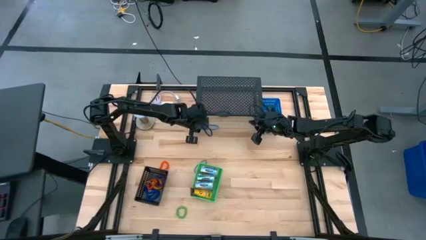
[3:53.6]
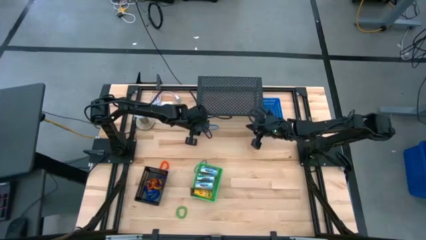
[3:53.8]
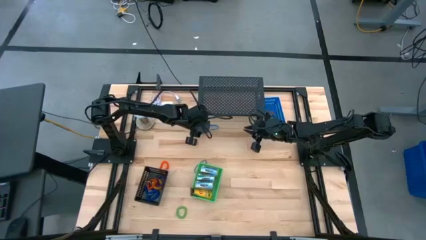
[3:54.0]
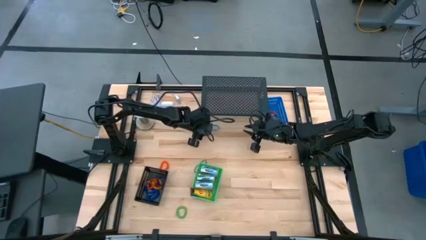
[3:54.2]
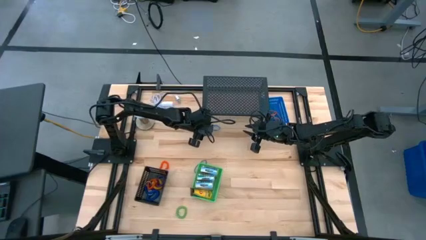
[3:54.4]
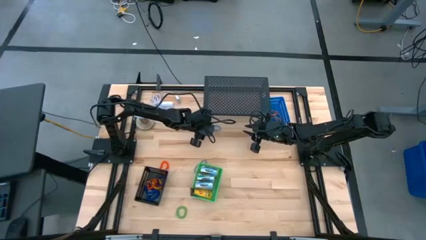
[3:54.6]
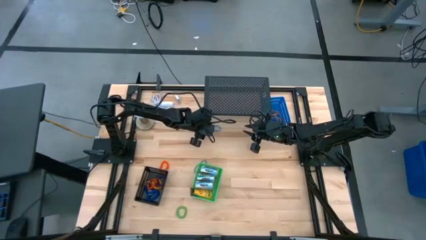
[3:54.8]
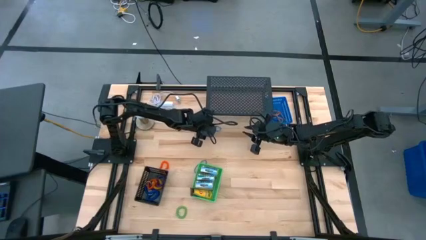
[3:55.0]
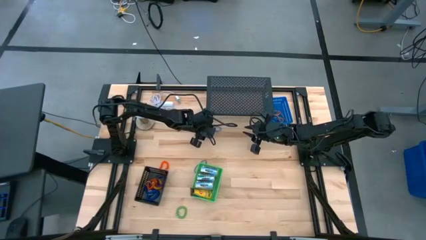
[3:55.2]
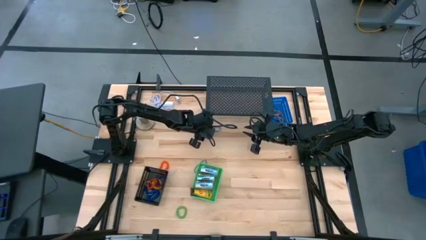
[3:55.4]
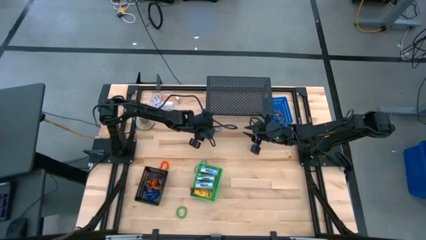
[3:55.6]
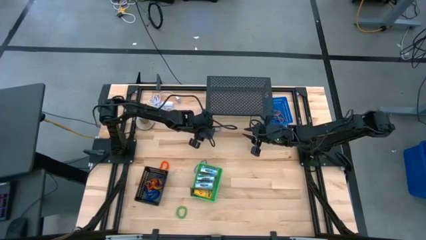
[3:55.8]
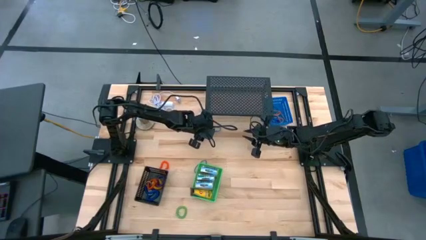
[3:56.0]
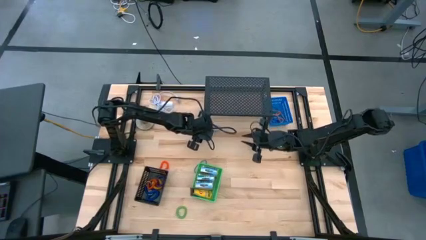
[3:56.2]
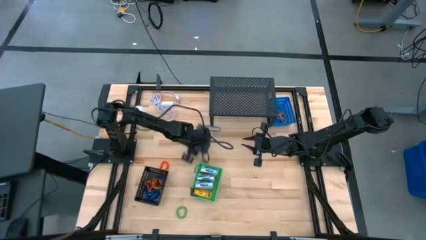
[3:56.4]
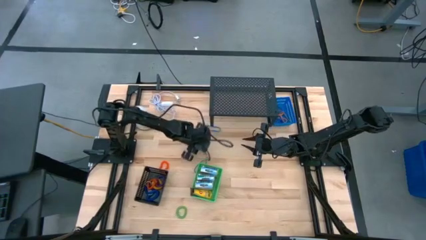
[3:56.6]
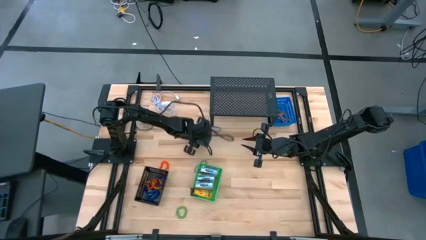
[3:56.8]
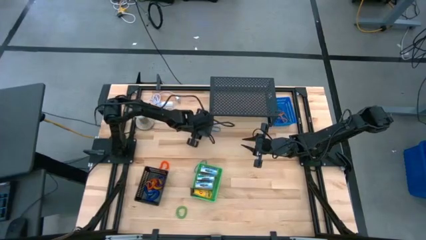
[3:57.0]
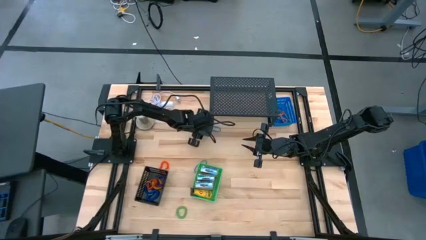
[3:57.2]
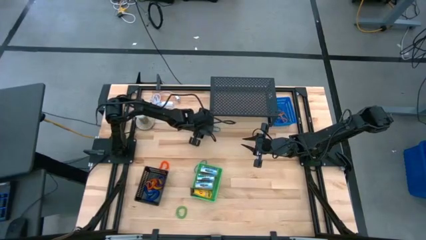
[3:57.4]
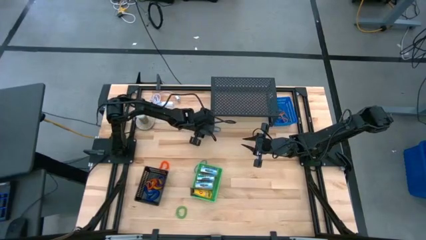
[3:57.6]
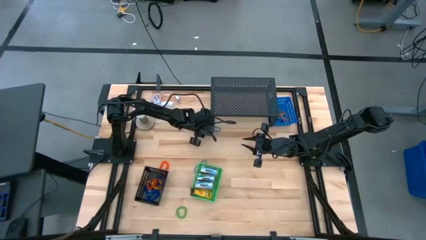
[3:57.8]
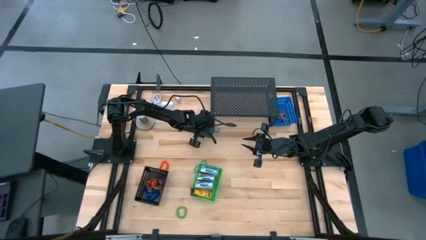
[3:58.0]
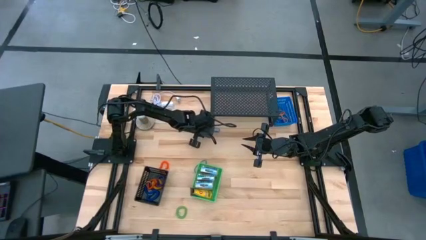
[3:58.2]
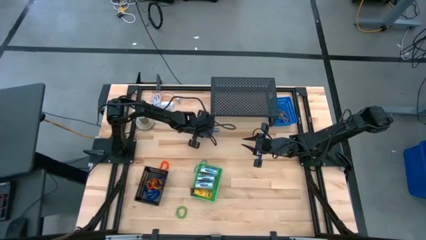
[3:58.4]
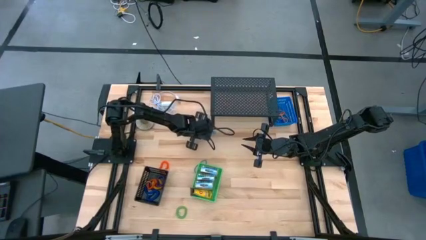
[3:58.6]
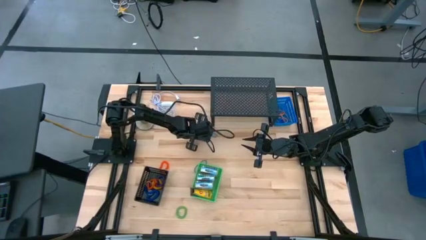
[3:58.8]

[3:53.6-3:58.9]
Task: Pick & Place Office Desk Supplies
Put the blue rubberband into the blue bin

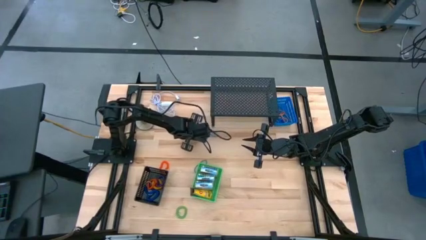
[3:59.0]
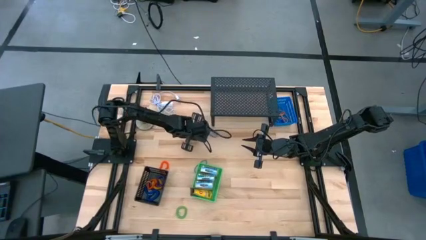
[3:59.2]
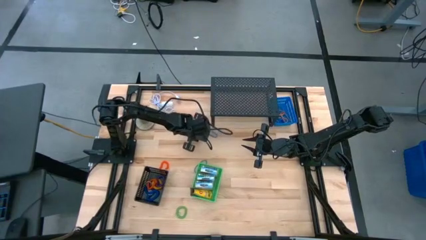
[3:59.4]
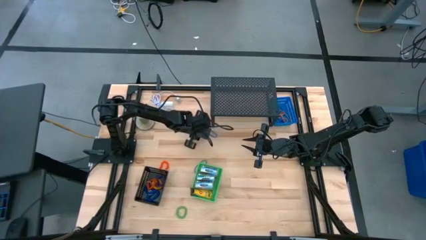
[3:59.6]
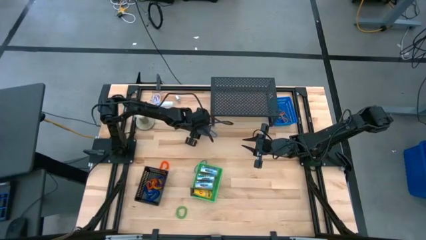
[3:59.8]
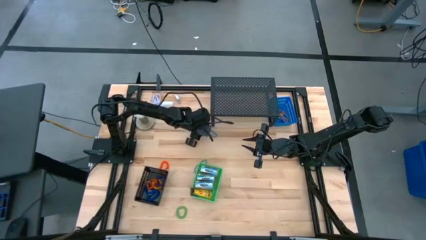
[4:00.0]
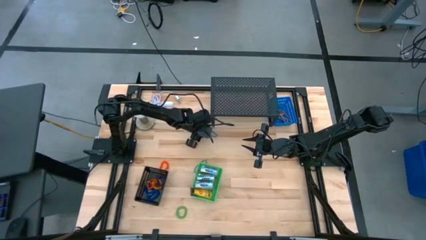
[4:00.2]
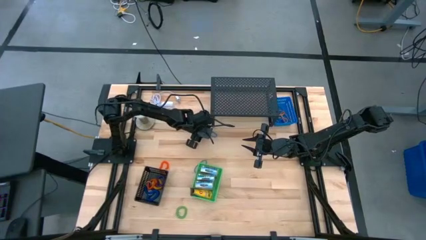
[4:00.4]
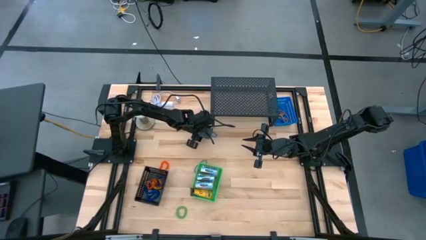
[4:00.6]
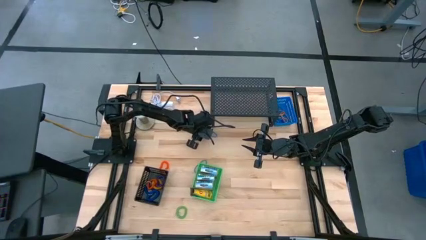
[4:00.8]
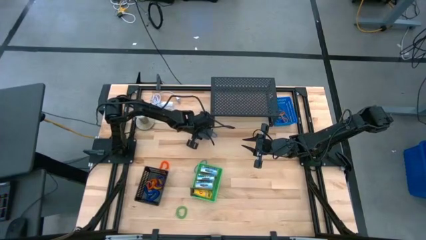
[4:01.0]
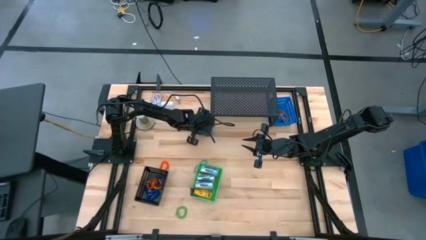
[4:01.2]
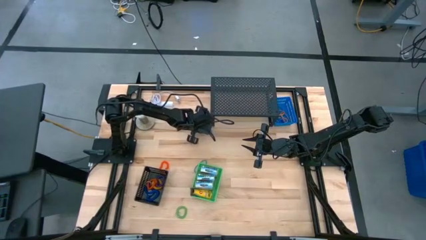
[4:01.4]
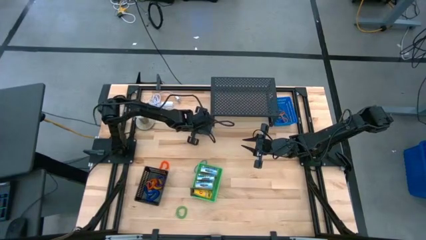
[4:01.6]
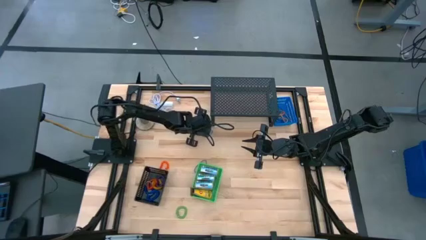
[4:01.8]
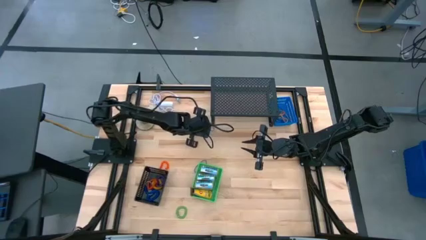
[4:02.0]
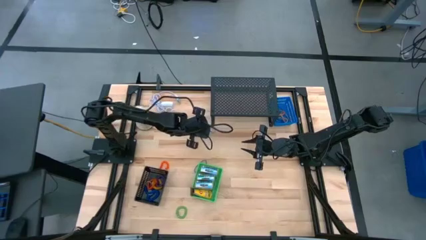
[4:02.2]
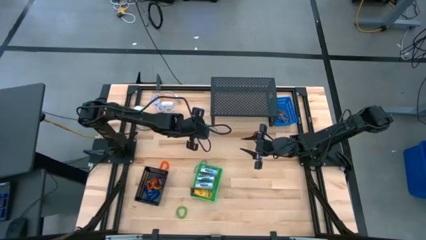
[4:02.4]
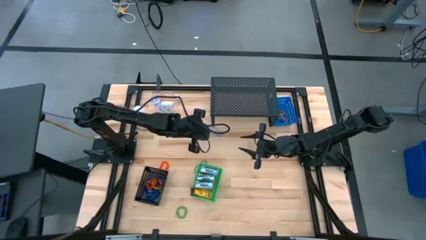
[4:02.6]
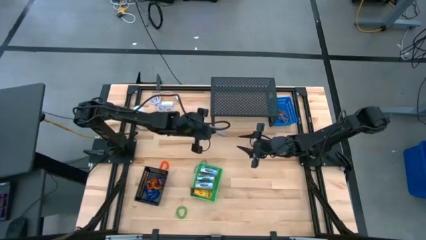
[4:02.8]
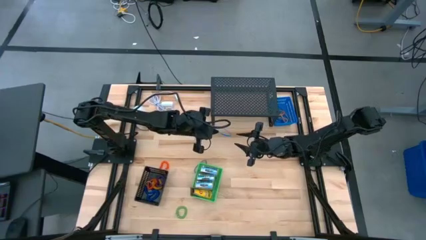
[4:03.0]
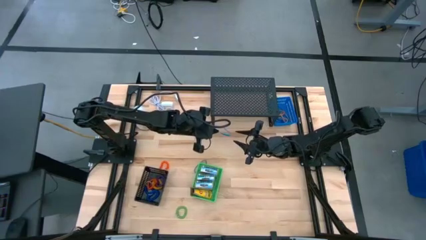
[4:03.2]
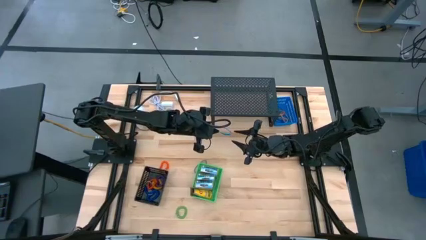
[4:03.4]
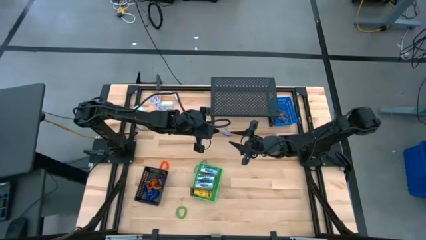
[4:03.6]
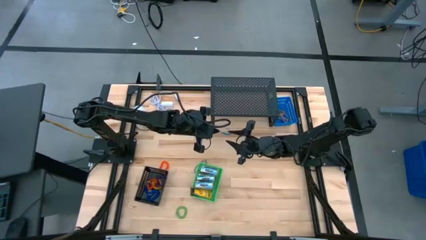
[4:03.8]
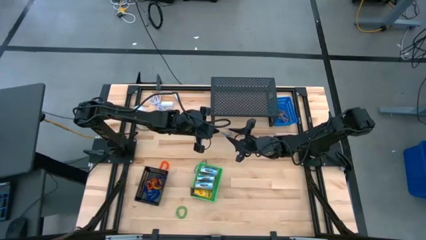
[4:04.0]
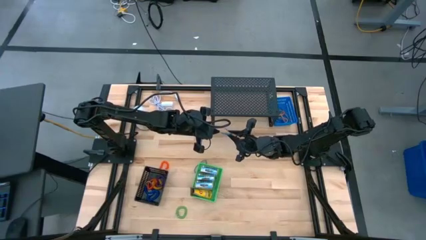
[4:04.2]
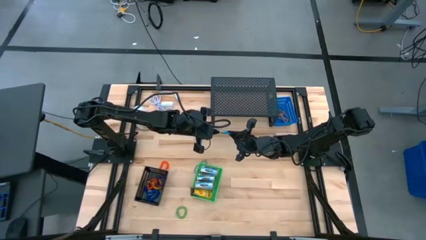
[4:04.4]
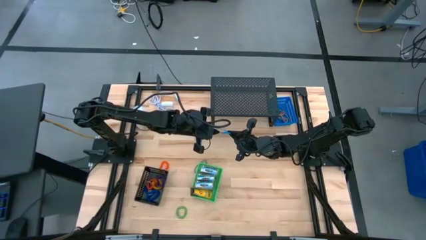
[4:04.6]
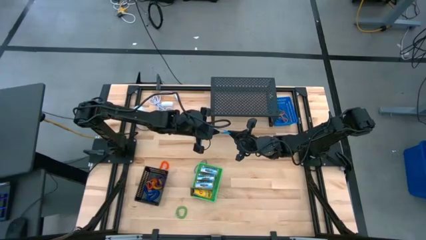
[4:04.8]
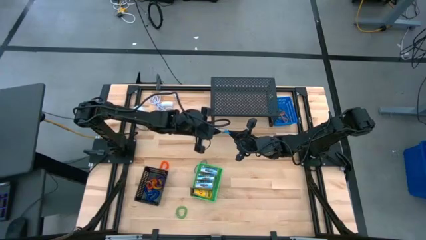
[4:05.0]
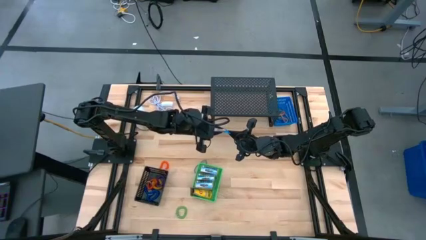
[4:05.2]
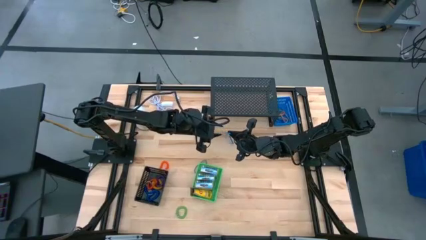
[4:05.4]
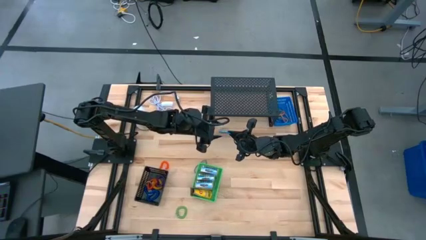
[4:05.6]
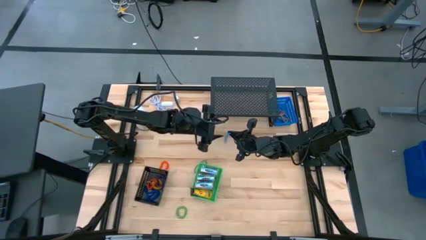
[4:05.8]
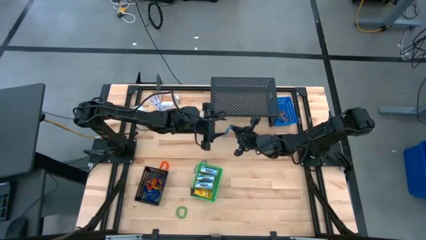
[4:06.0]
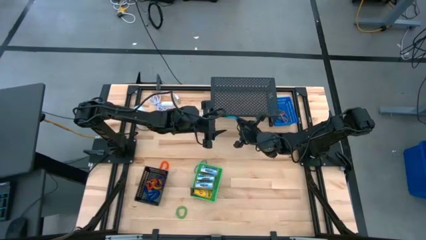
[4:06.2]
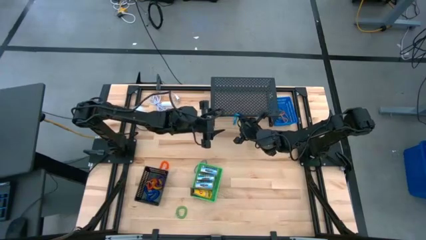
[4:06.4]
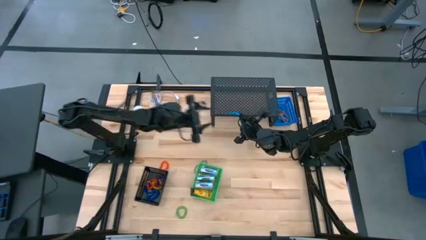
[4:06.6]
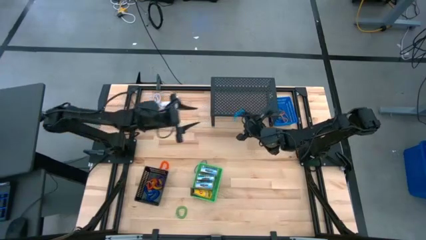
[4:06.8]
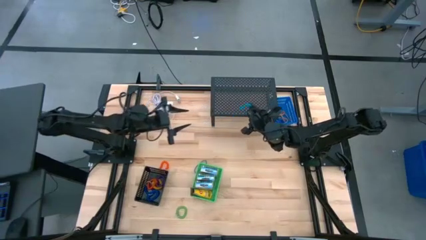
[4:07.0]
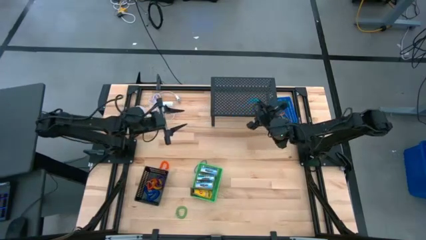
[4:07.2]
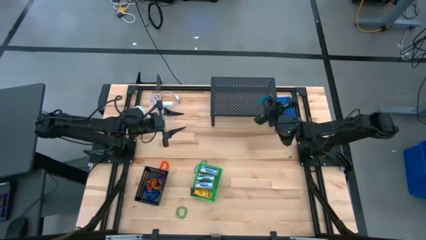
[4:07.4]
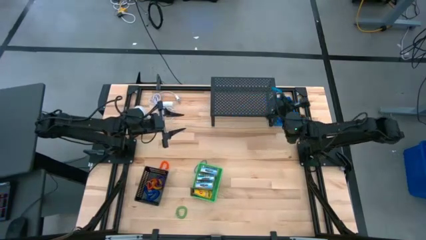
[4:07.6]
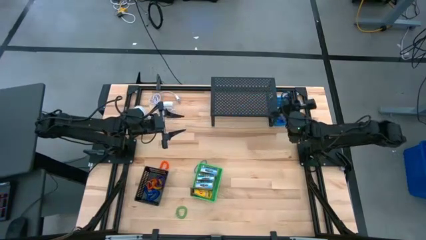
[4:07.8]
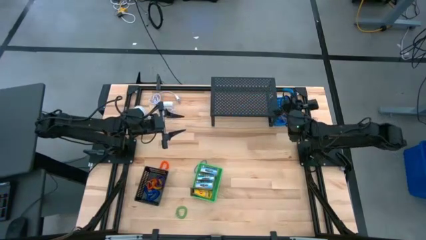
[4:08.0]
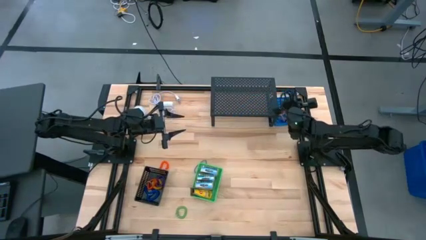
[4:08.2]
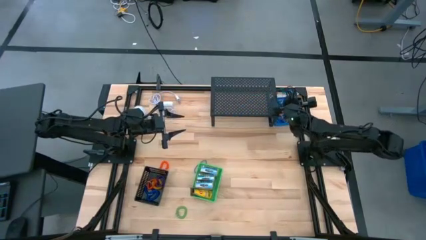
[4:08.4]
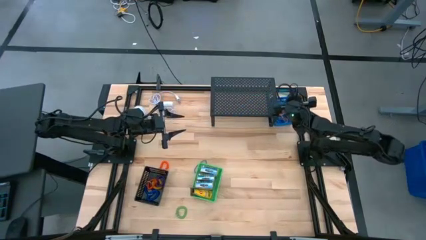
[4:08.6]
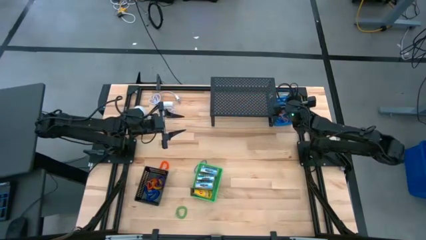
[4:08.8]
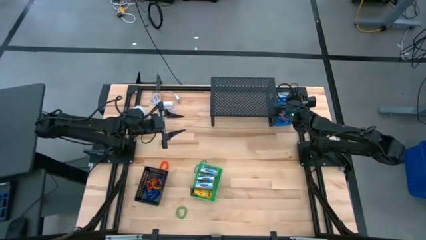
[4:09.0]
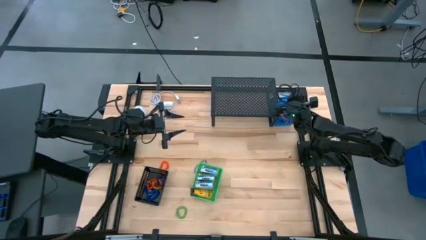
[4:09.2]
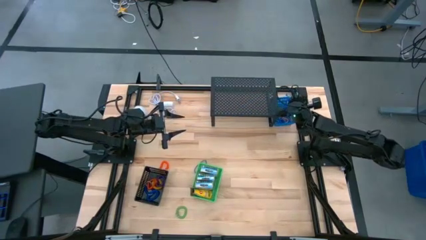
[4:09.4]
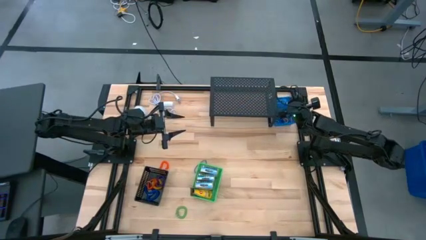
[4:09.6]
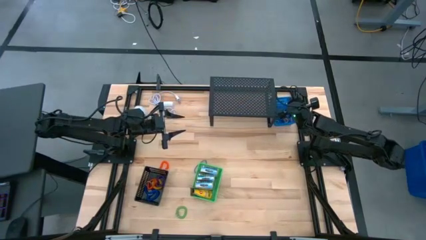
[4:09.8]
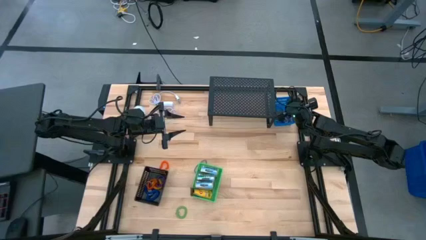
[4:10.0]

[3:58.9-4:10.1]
Put the blue rubberband into the blue bin
